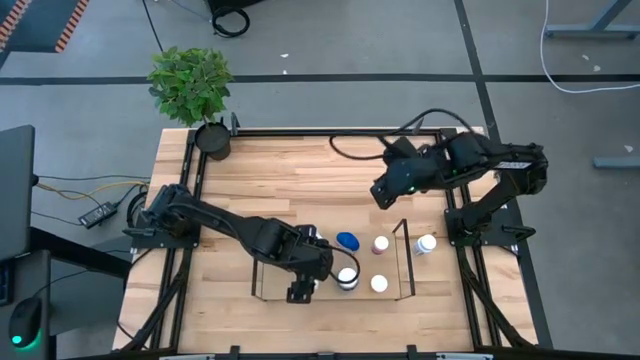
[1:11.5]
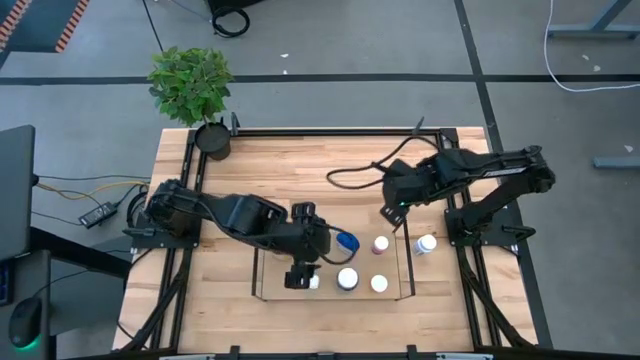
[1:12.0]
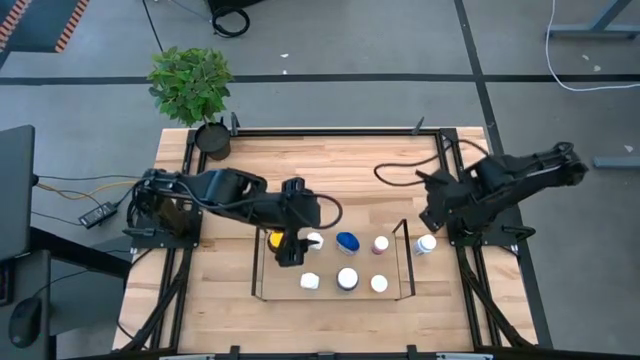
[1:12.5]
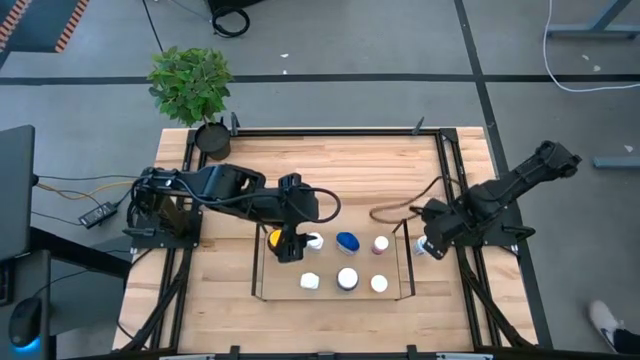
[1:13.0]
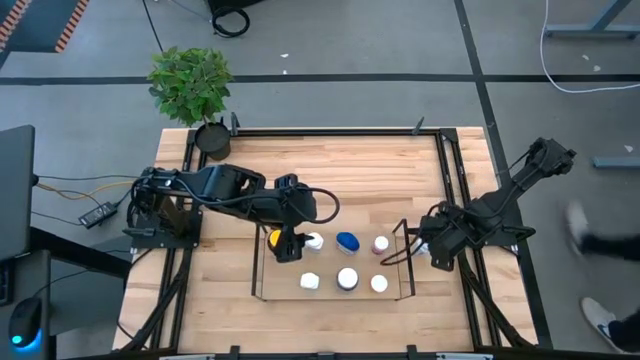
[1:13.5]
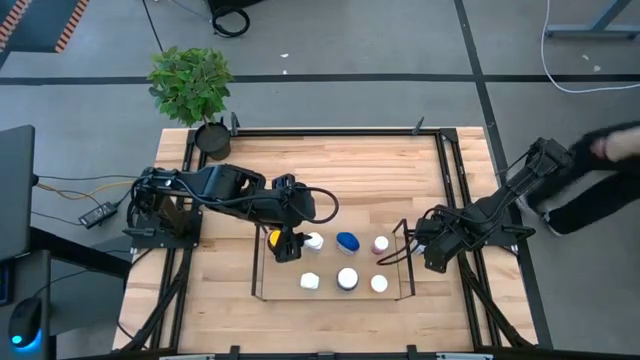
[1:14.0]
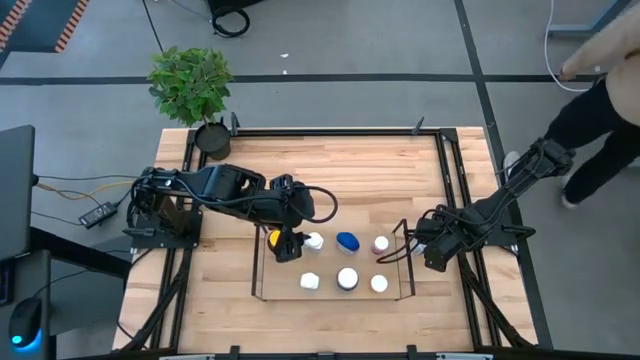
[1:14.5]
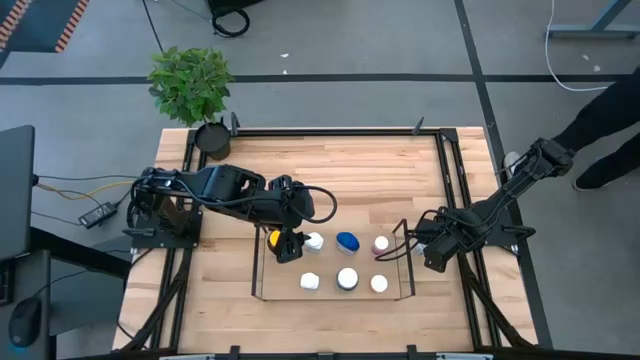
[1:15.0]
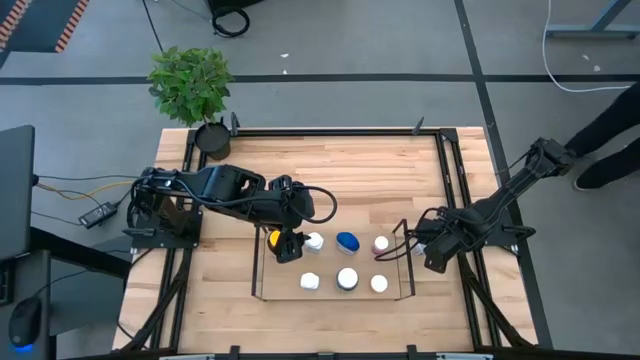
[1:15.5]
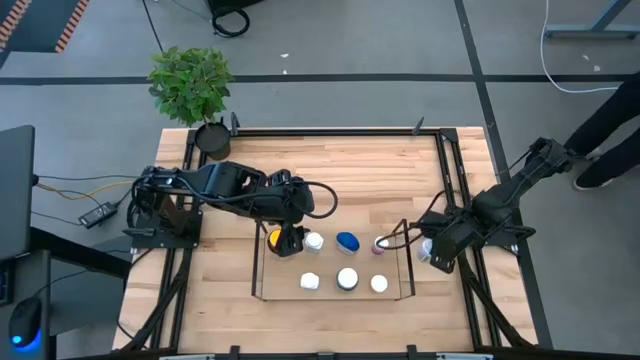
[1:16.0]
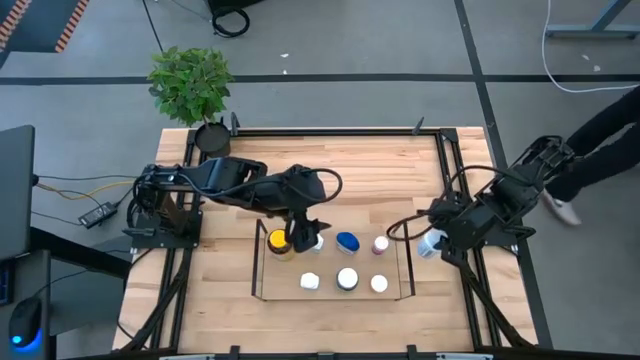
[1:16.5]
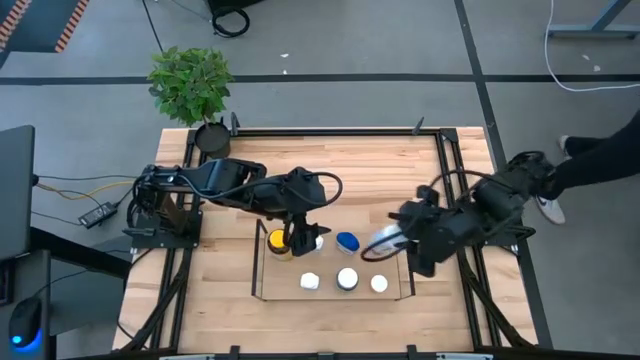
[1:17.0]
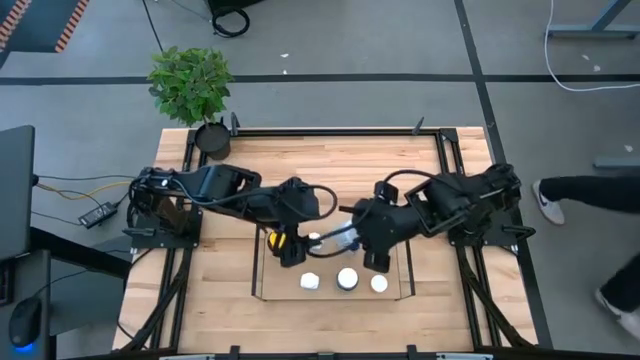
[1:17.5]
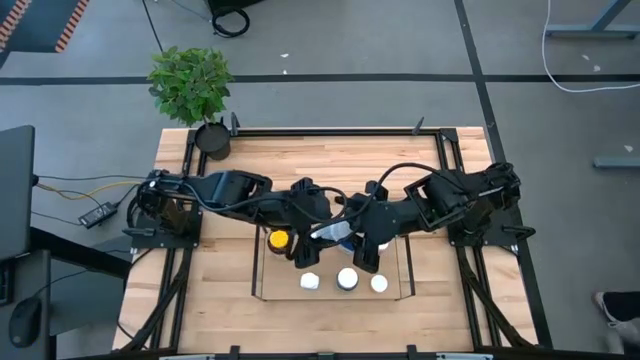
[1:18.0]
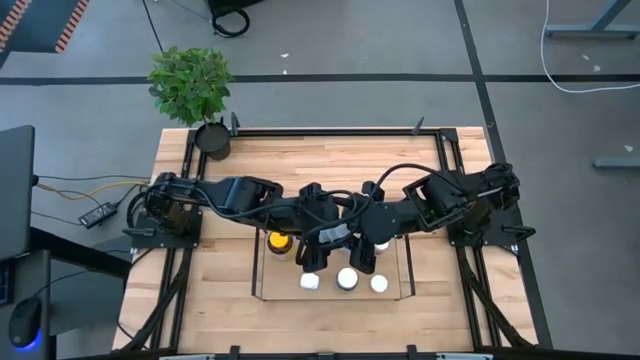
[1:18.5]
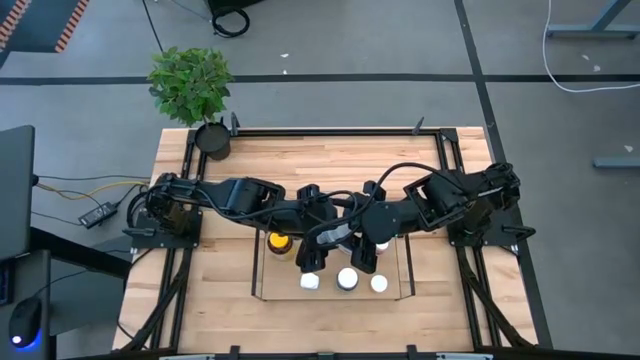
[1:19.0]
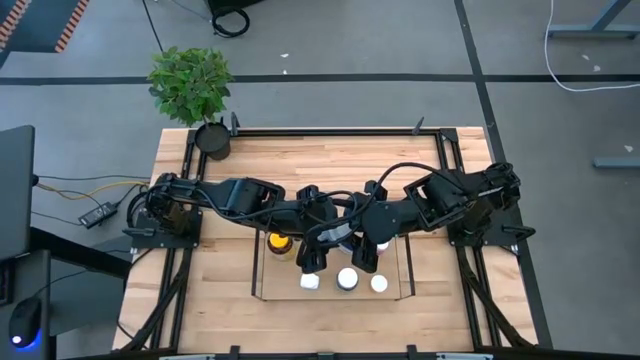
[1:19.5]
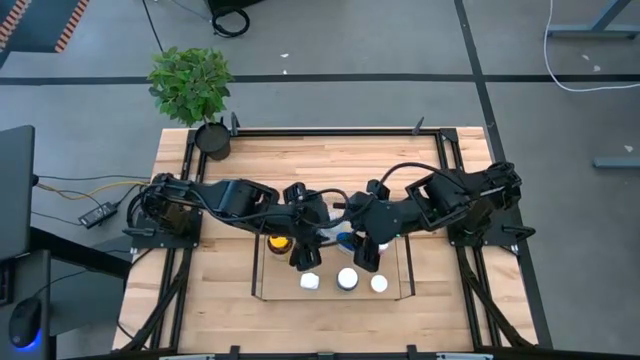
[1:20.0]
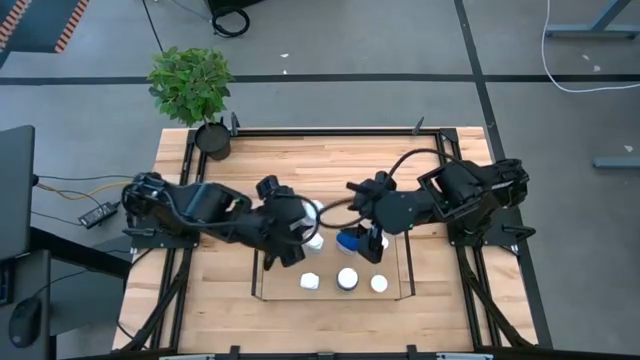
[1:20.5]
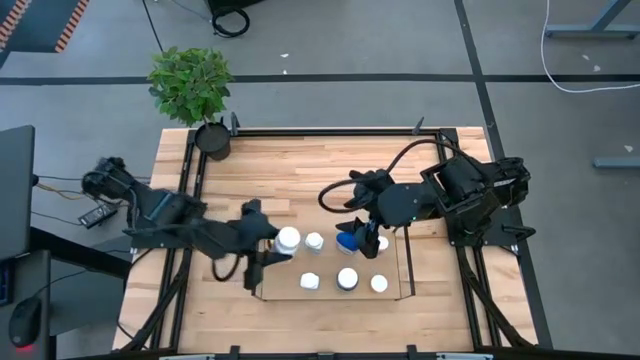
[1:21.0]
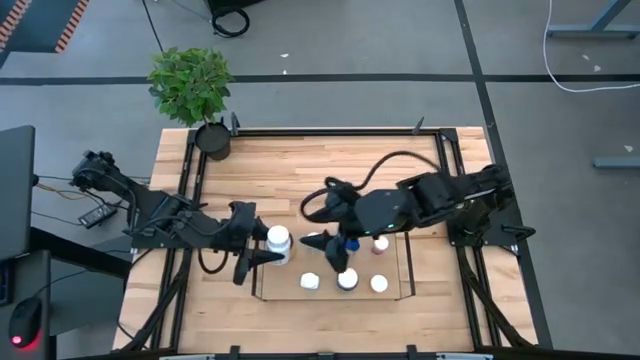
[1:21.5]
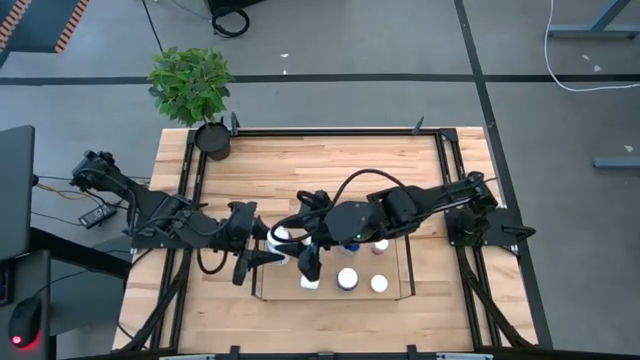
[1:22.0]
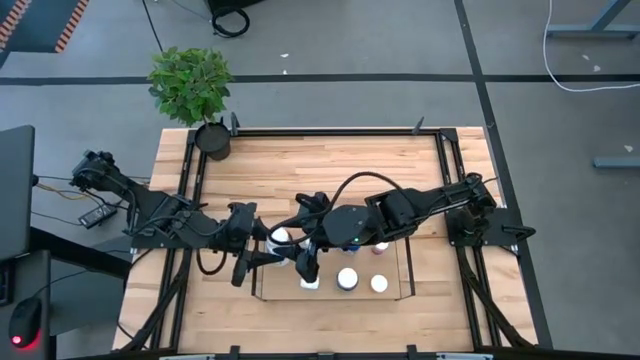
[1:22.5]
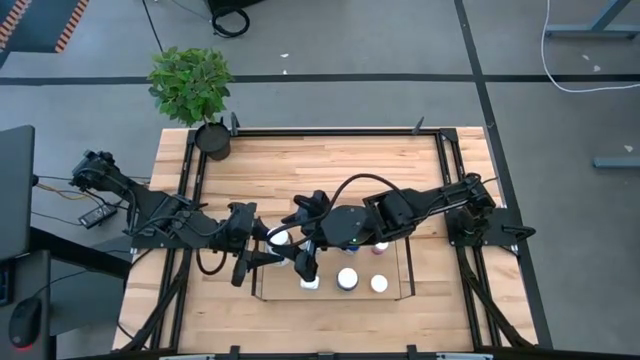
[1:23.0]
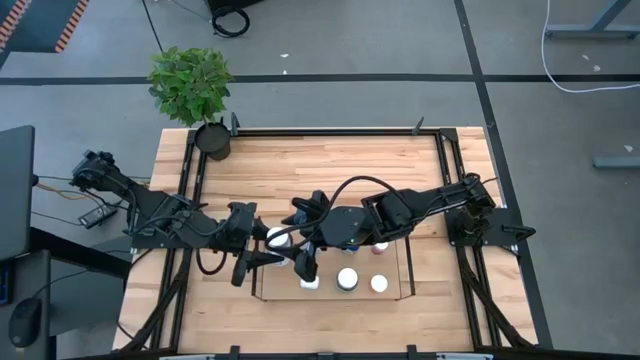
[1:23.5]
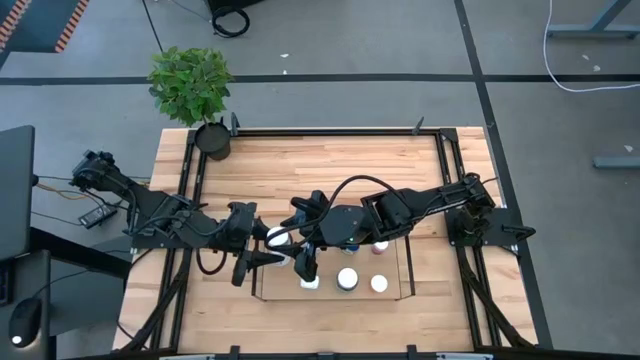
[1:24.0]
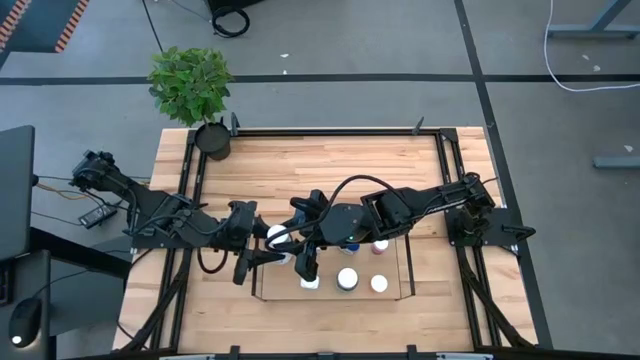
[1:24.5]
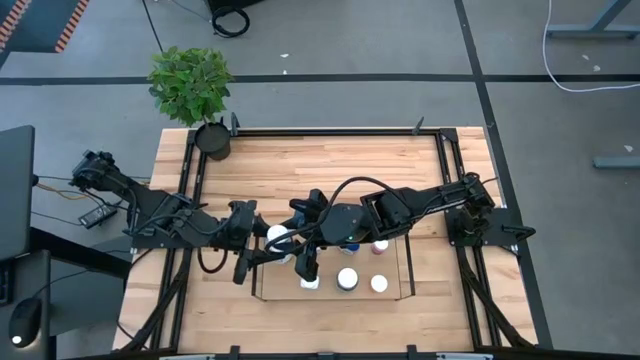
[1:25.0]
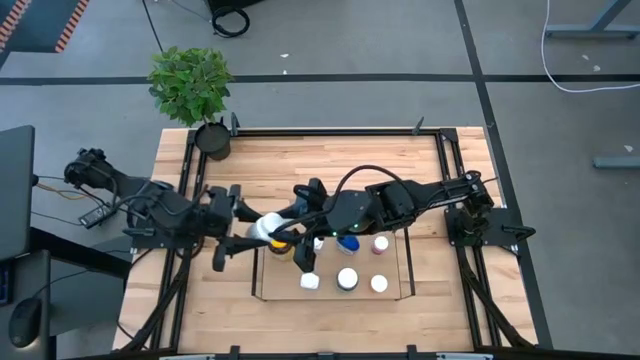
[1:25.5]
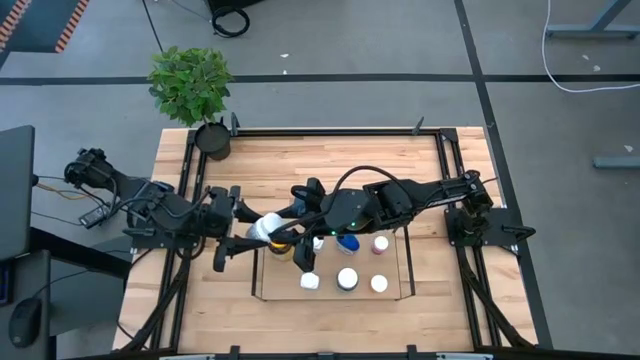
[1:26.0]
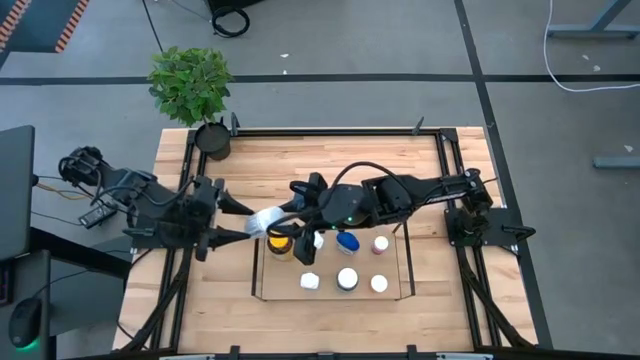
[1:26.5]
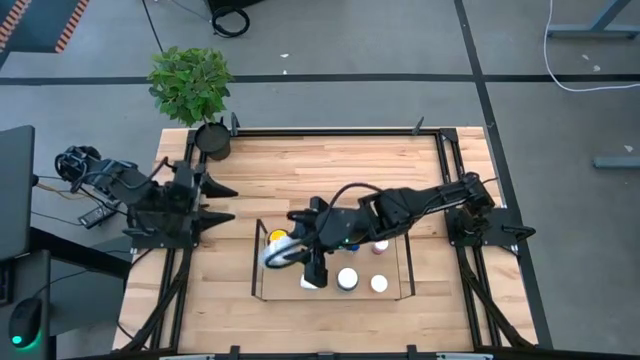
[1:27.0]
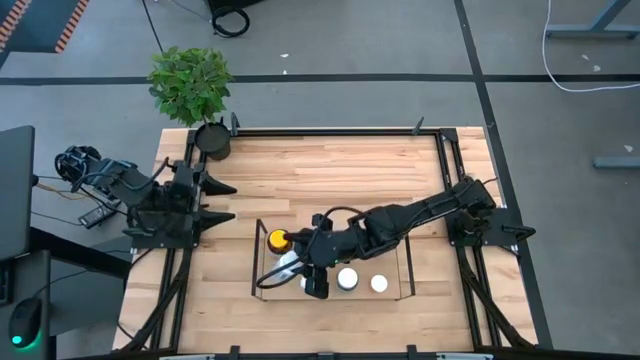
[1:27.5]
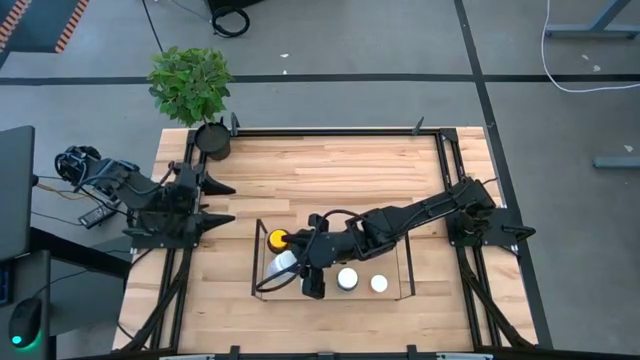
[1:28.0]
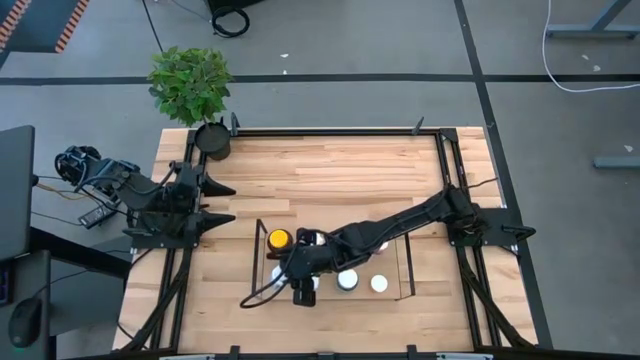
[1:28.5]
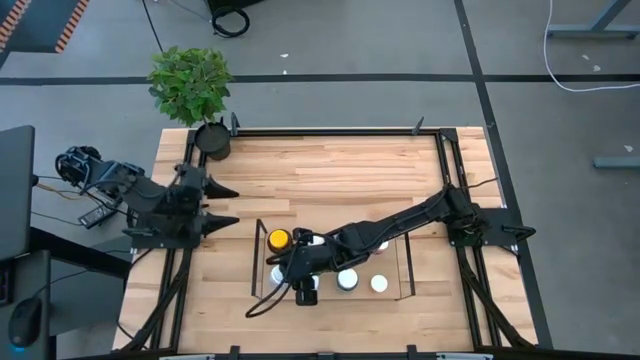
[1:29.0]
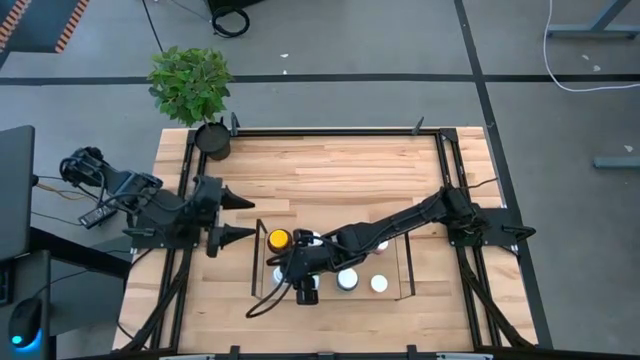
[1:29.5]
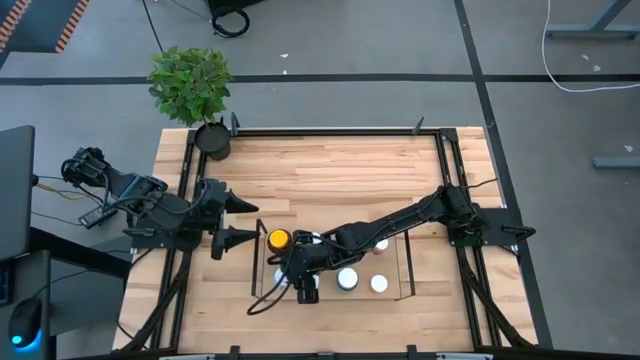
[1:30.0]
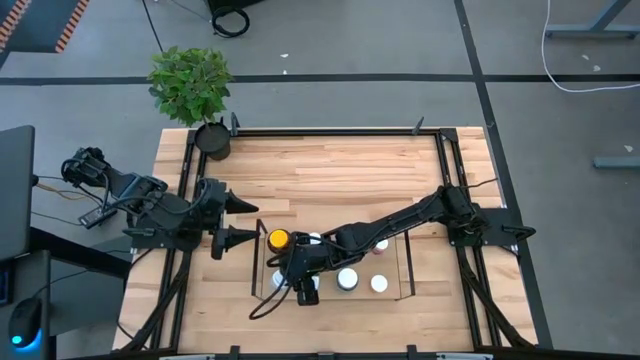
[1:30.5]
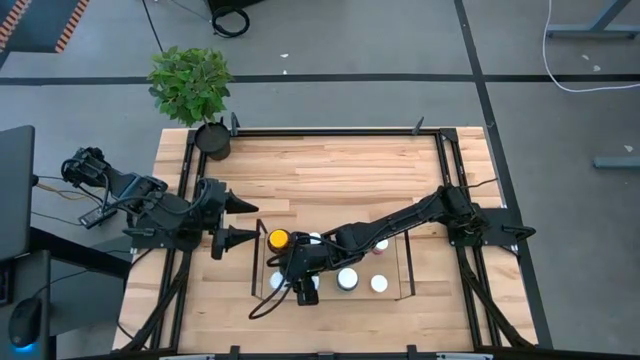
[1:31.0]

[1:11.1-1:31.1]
Task: Pick and place medicine bottles onto shelf by color
Put the white pill bottle on the shelf

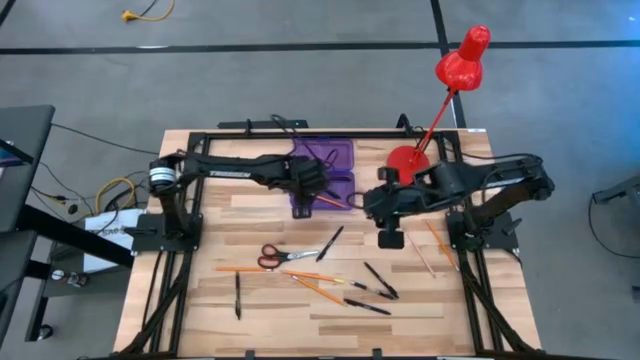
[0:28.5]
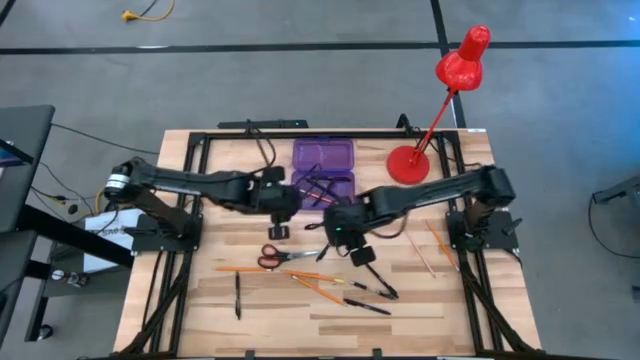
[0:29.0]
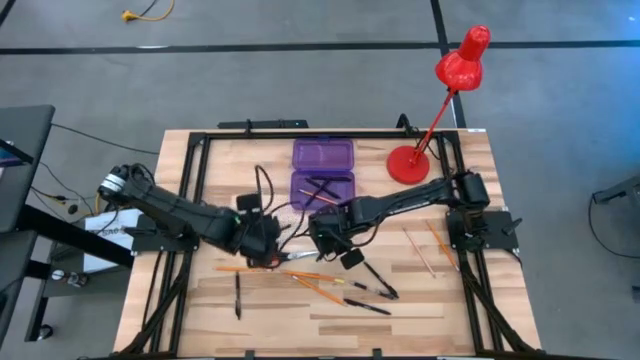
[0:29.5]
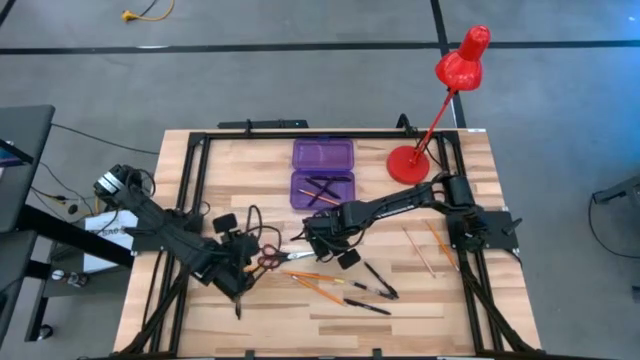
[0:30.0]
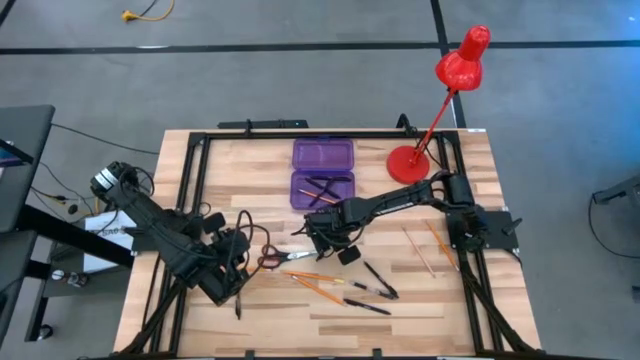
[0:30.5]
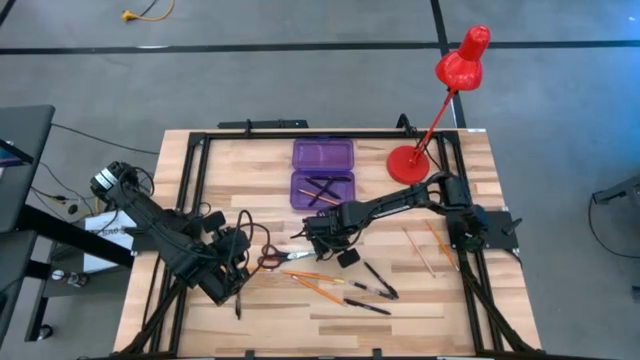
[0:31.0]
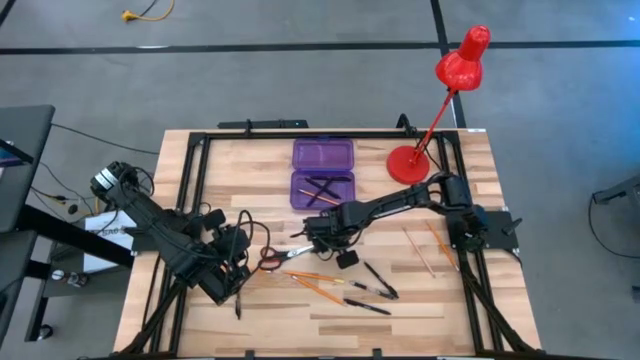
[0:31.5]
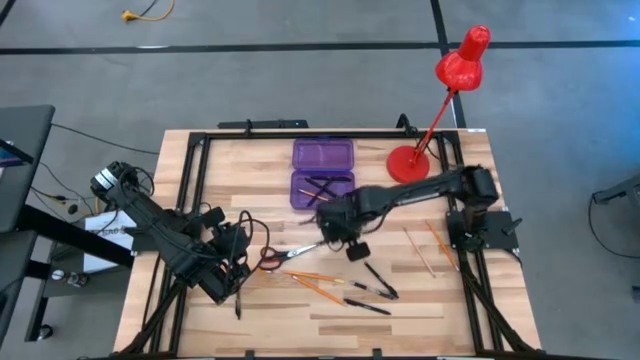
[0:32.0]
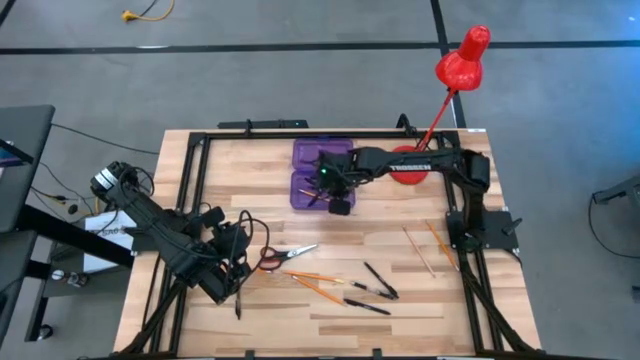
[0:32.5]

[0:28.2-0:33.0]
Task: Pick & place school supplies into a supply box
Put the black pen into the purple supply box
